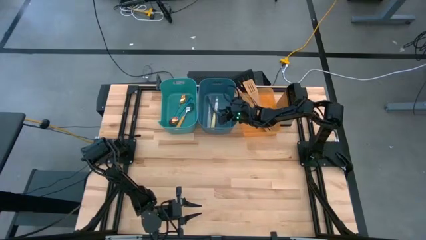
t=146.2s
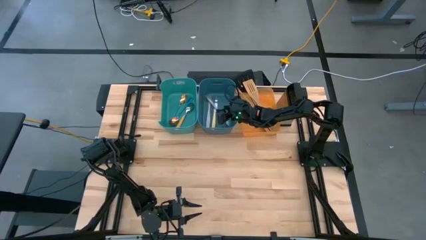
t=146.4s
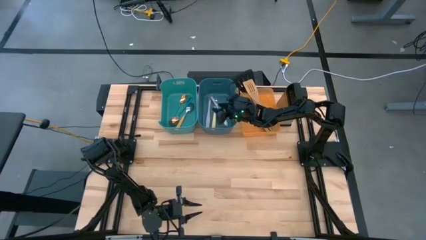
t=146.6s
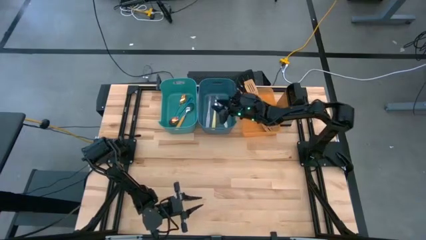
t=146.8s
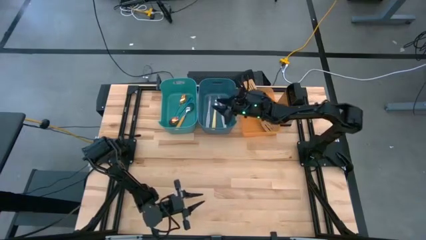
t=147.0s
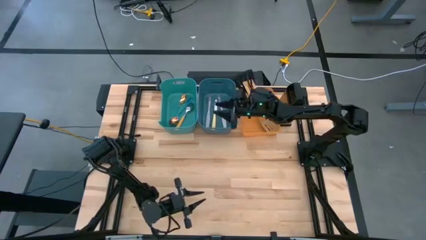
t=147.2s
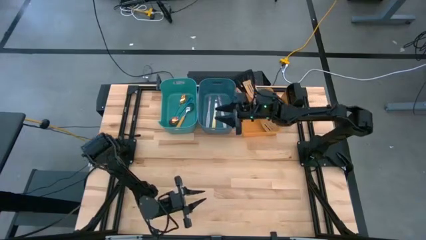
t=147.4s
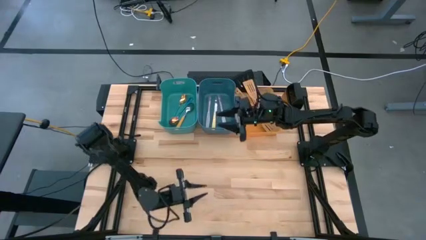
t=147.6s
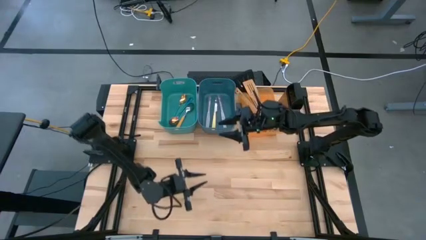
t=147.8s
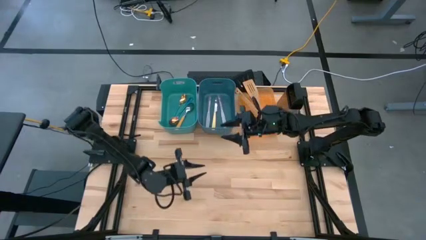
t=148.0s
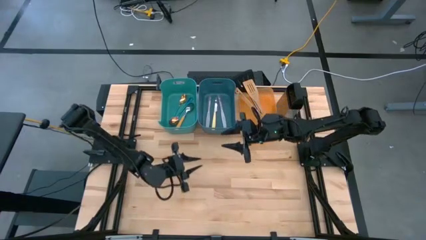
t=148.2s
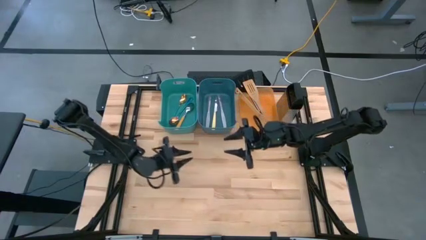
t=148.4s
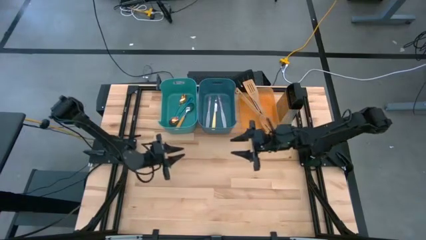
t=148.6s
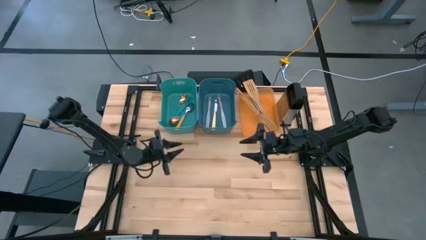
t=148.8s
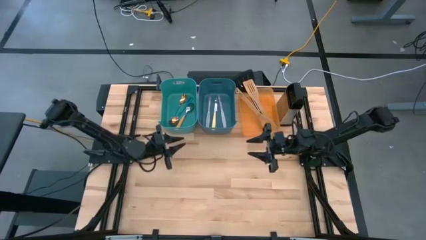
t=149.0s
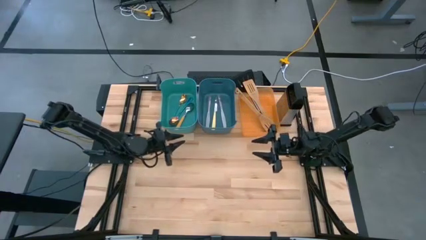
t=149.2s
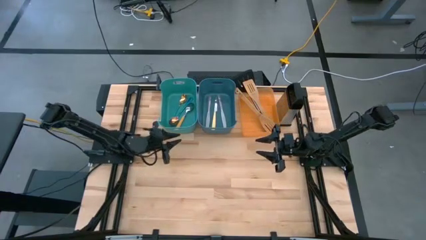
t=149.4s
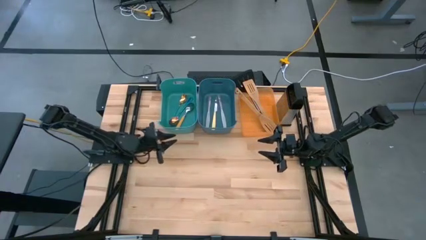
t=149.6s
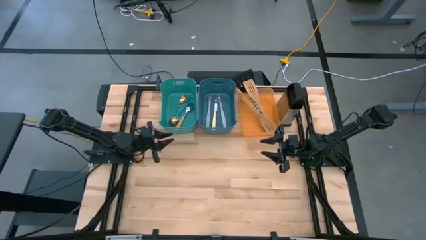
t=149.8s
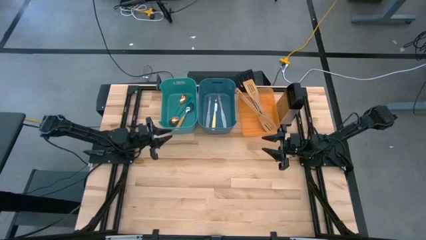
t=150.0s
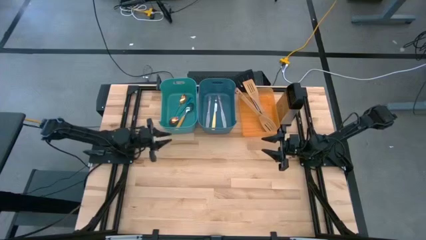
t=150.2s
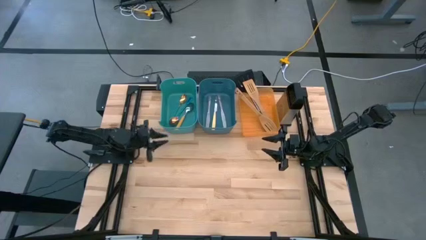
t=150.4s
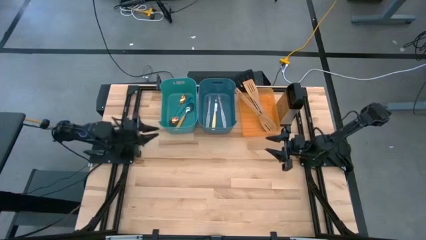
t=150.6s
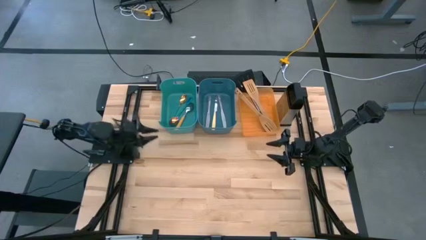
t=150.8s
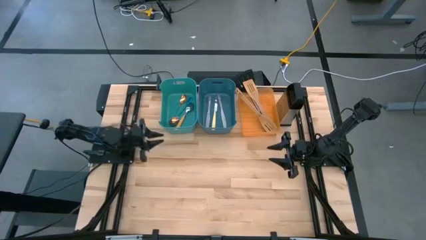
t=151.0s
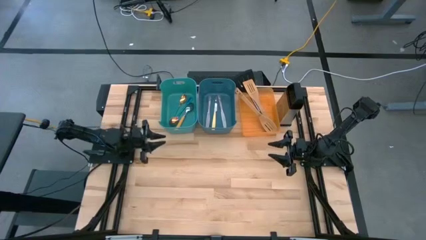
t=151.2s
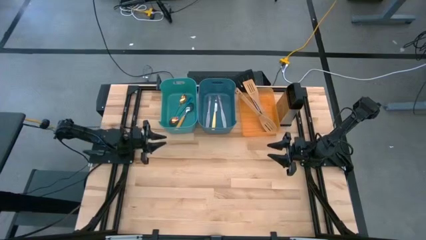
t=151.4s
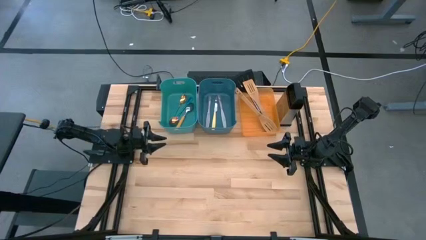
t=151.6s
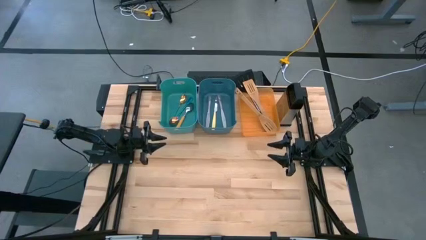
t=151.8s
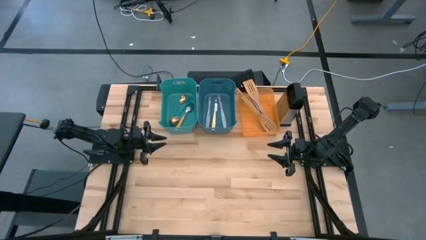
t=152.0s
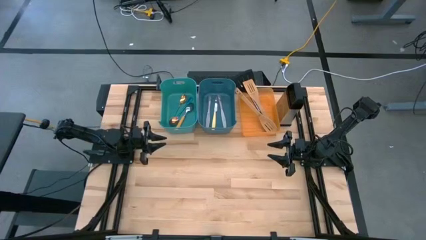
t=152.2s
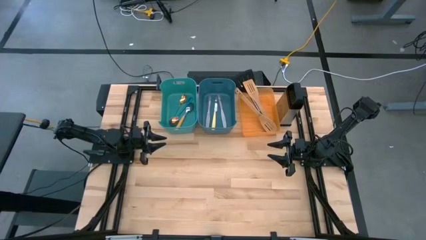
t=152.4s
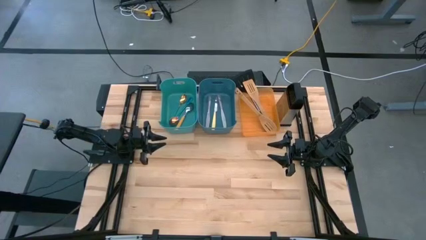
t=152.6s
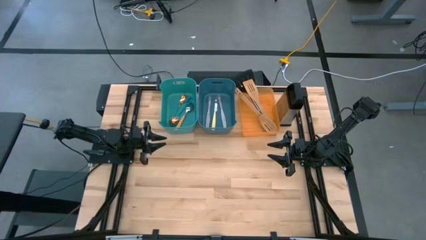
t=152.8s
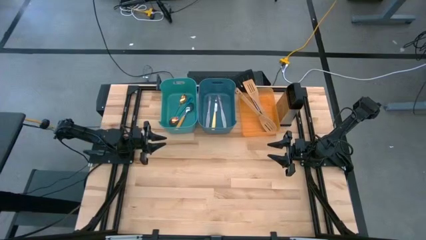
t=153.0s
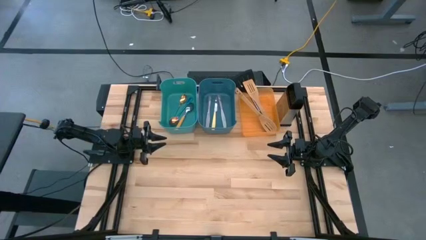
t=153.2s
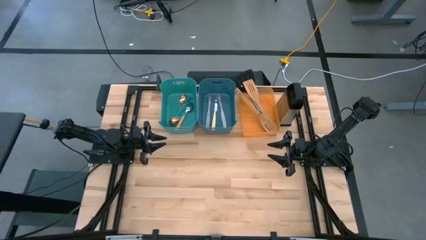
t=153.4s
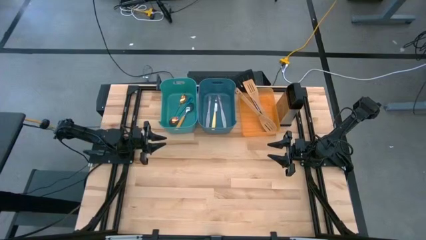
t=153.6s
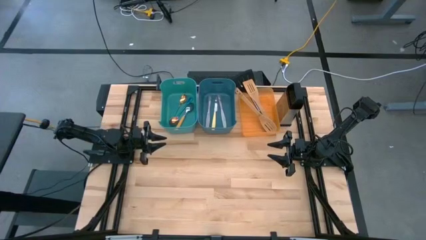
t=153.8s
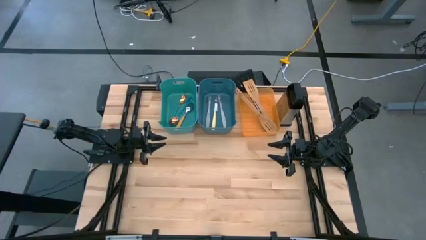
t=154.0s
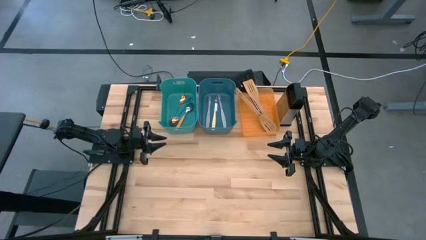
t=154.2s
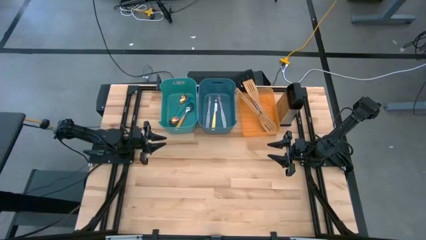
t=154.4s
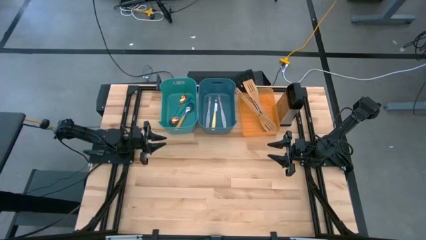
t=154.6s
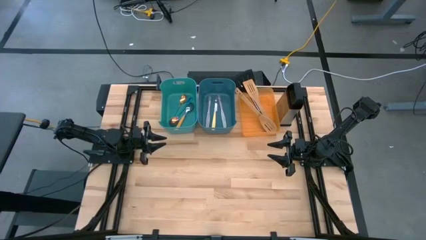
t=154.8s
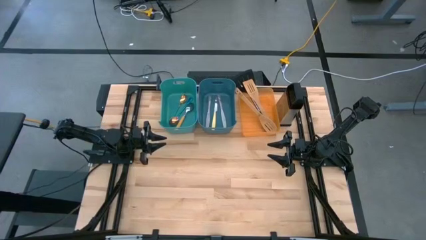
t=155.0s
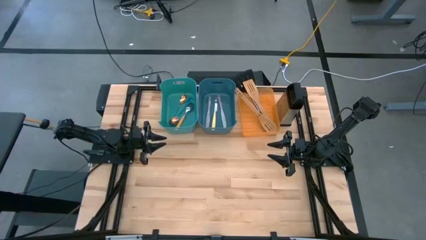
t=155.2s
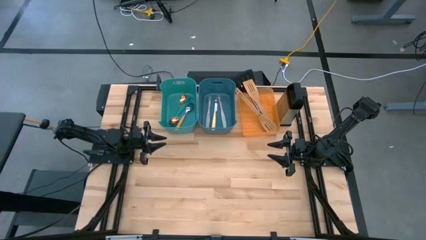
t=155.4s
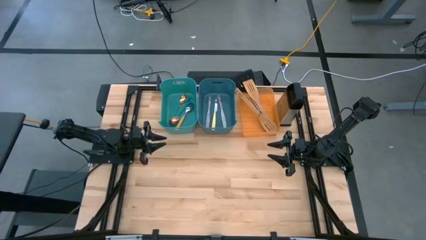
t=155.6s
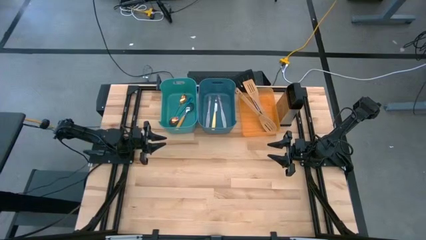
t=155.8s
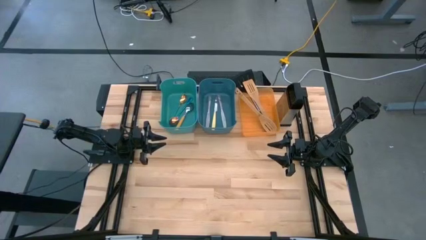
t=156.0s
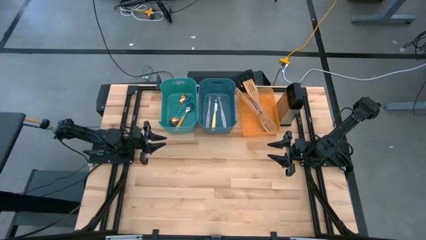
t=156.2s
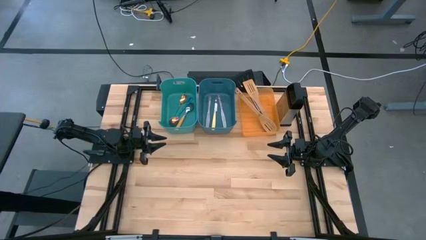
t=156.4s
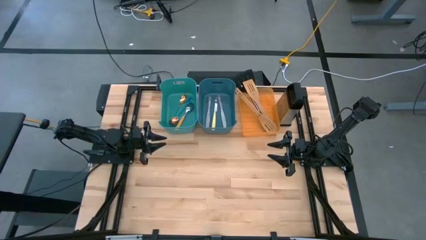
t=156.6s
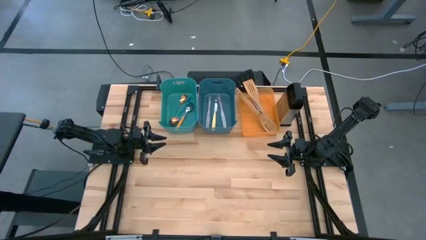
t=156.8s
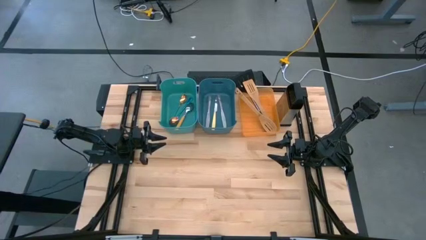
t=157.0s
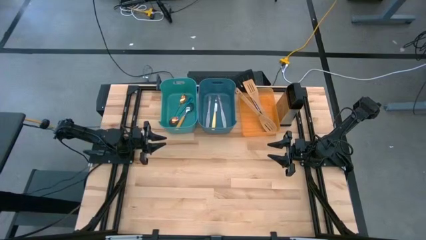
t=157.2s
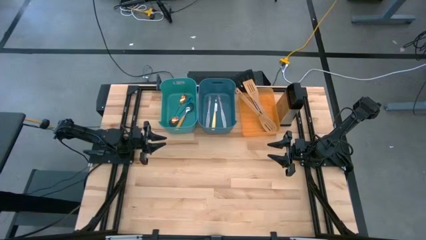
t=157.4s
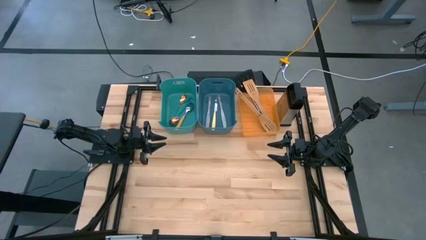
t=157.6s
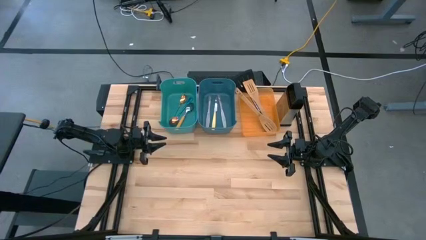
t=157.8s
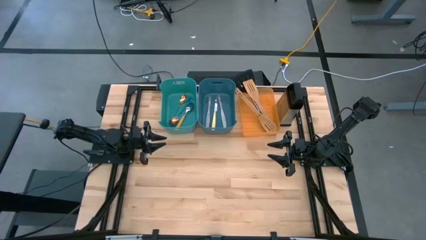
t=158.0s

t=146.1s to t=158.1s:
Task: Pick & Place Kitchen Items
Return to home position

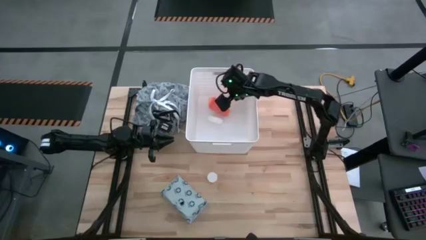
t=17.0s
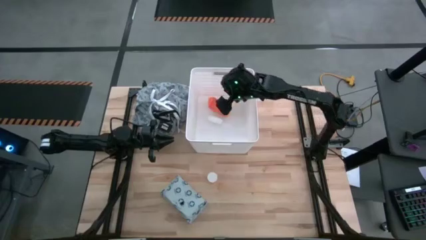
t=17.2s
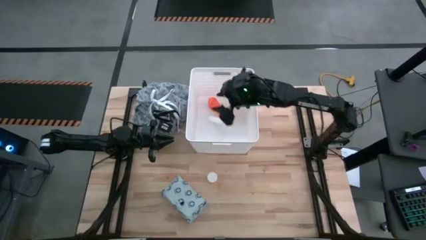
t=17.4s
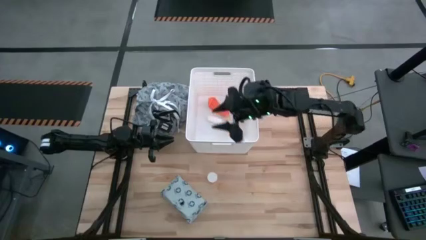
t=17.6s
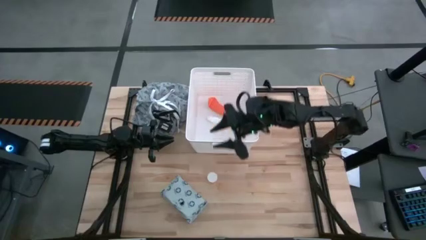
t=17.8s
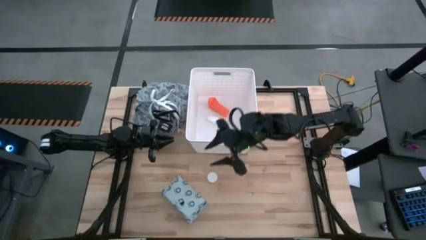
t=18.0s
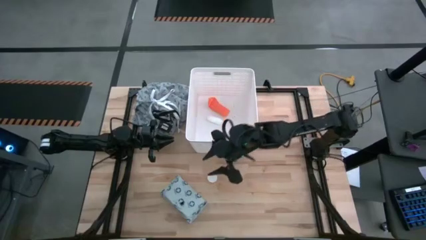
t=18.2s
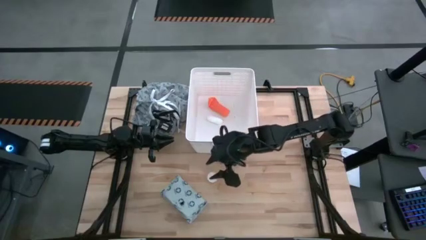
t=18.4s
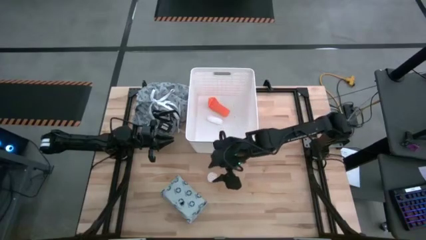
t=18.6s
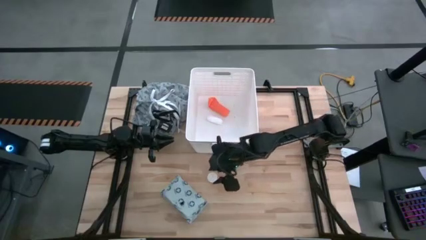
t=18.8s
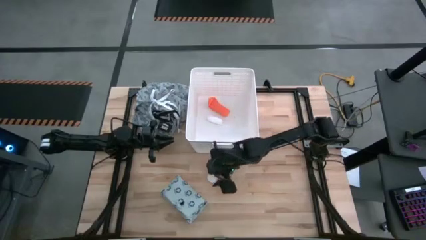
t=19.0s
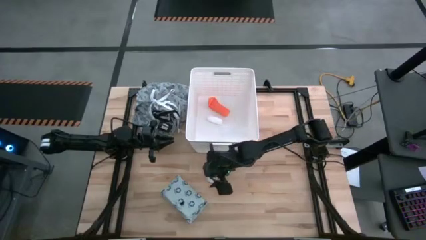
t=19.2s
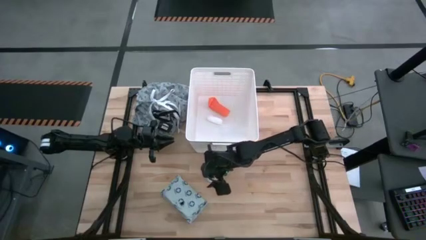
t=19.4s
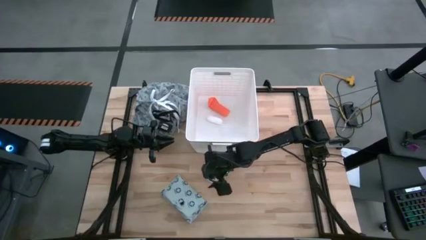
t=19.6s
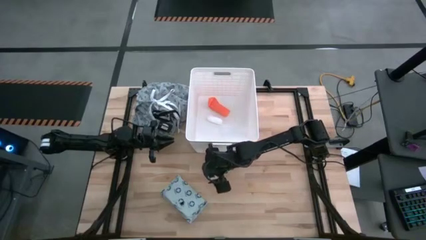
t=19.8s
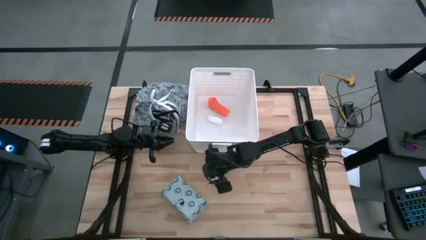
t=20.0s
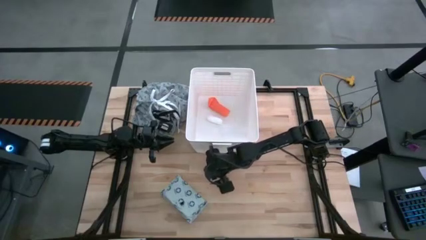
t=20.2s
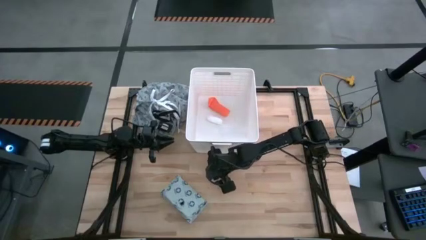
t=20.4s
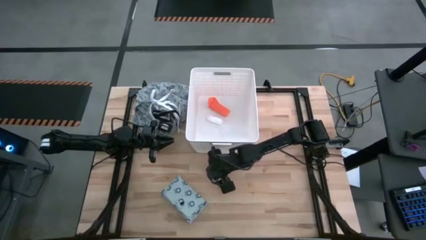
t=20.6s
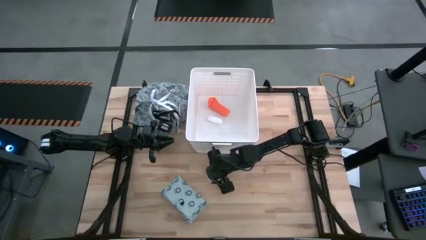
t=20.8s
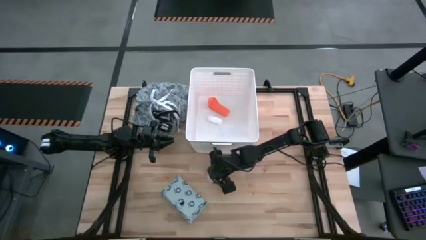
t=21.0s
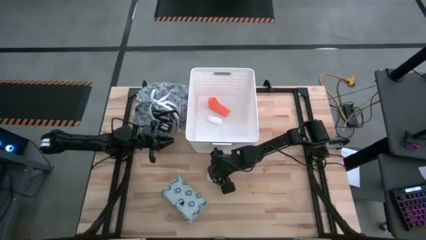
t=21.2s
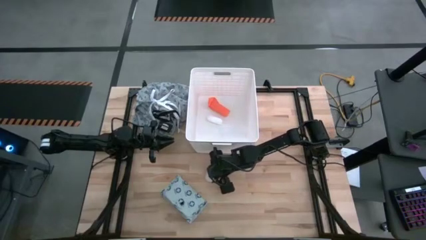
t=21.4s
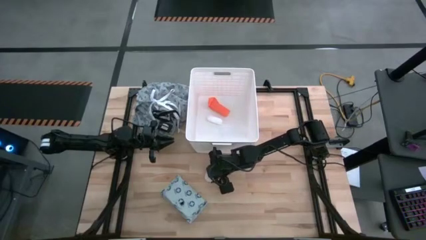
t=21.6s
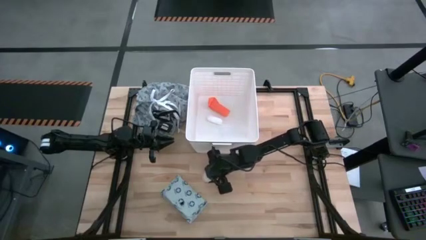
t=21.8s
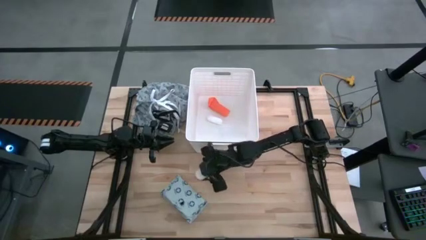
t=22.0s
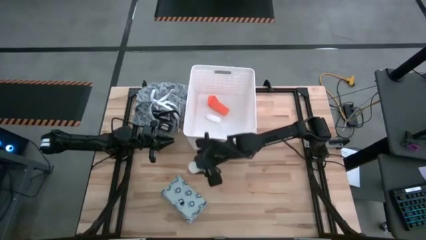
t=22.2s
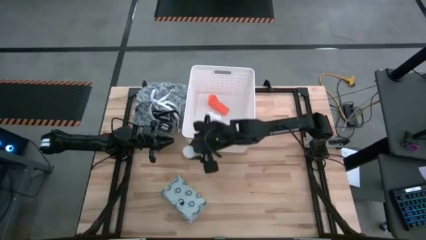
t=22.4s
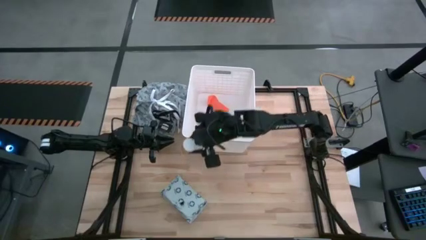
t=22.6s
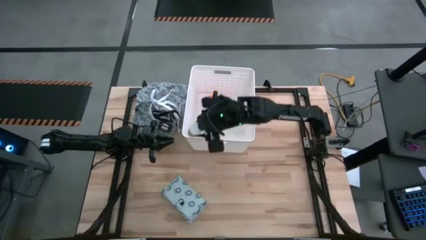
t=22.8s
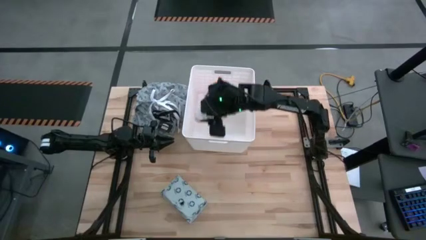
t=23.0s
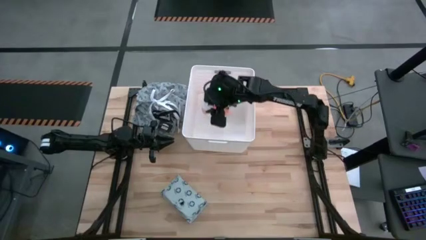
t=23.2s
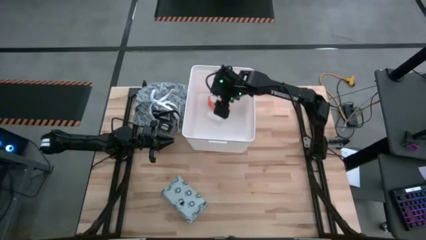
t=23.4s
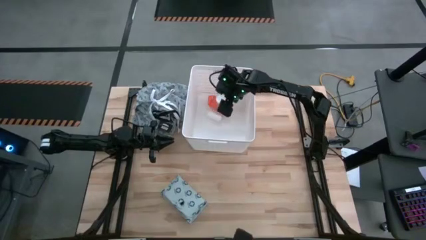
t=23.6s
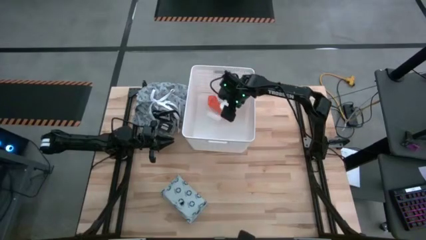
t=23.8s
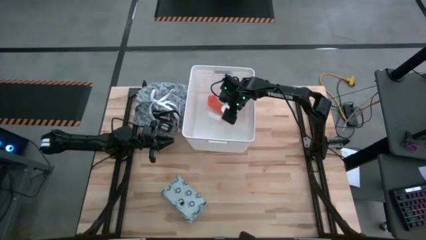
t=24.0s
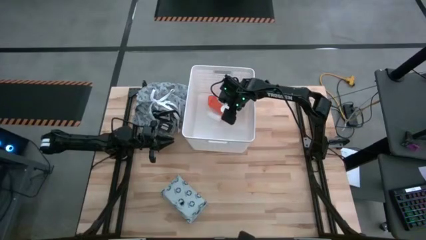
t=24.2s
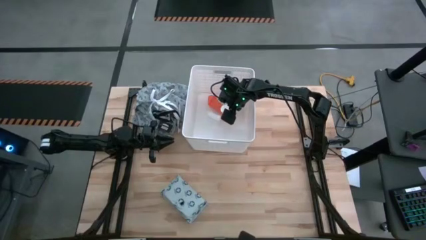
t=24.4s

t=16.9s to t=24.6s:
Task: Pick & place medical supplies in basket/bin
Put the orange medicine bottle into the white bin
